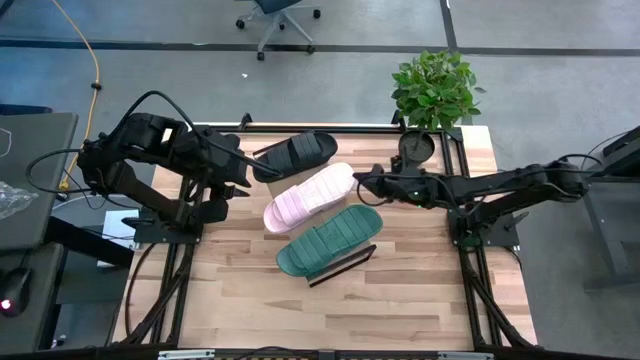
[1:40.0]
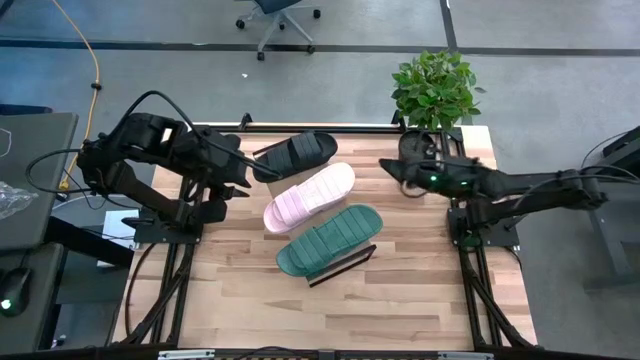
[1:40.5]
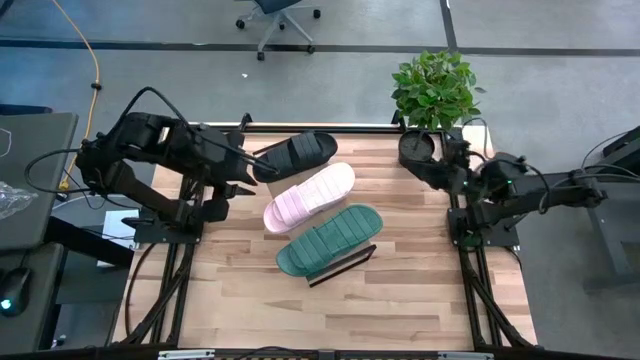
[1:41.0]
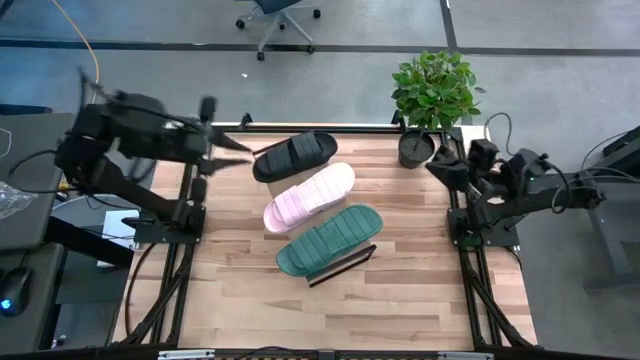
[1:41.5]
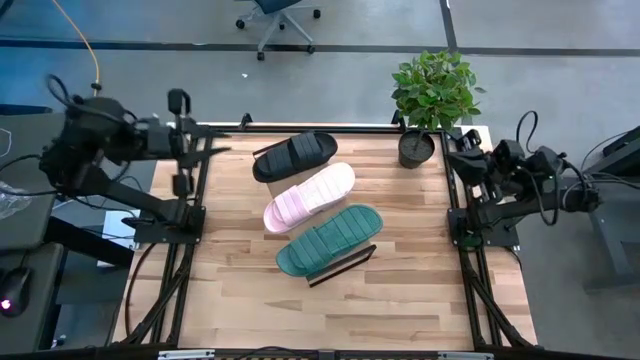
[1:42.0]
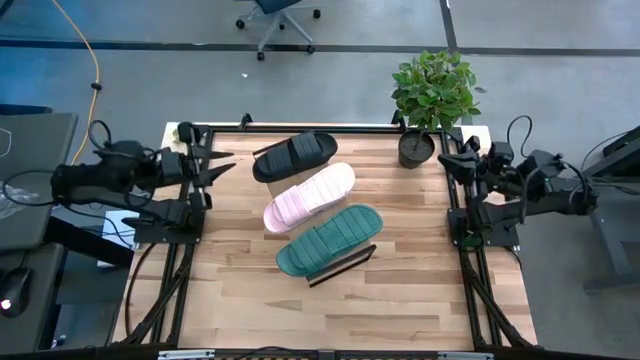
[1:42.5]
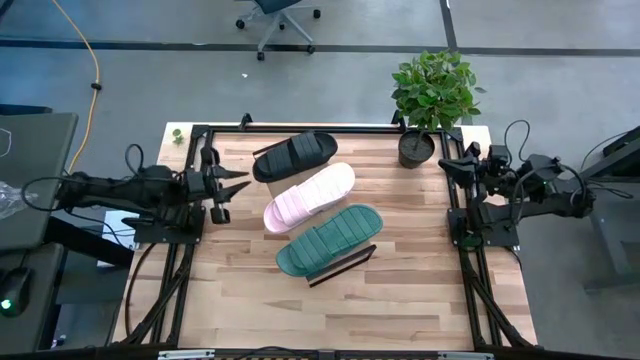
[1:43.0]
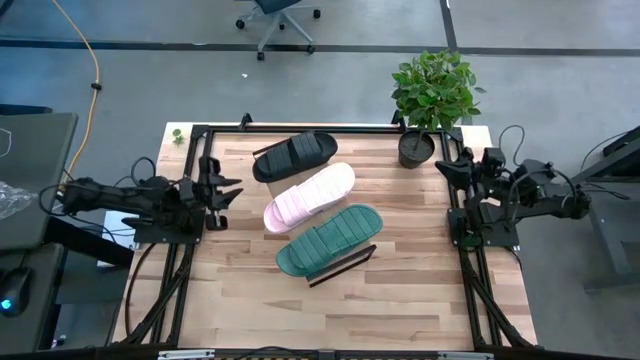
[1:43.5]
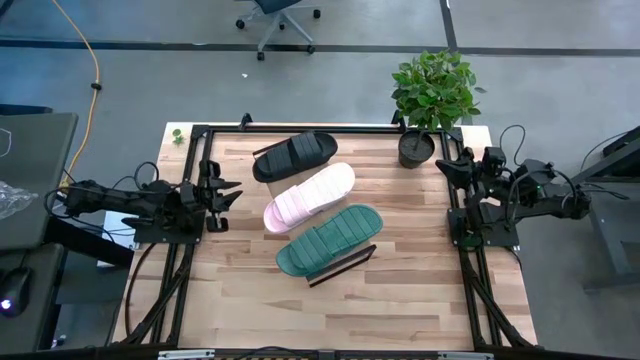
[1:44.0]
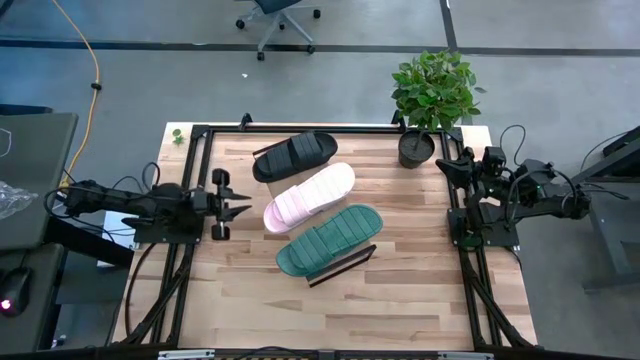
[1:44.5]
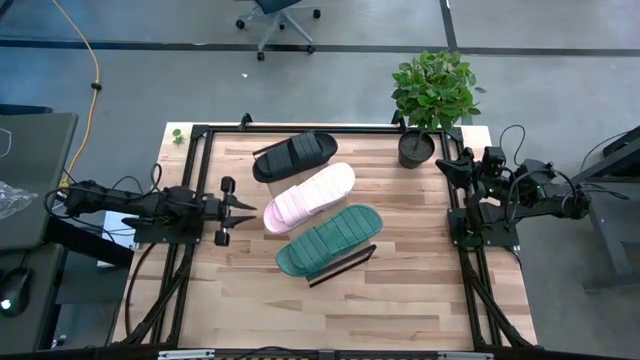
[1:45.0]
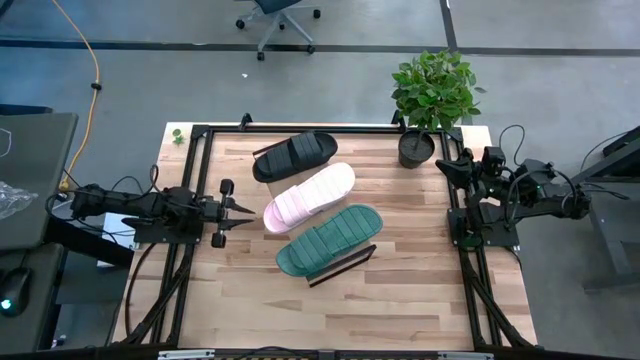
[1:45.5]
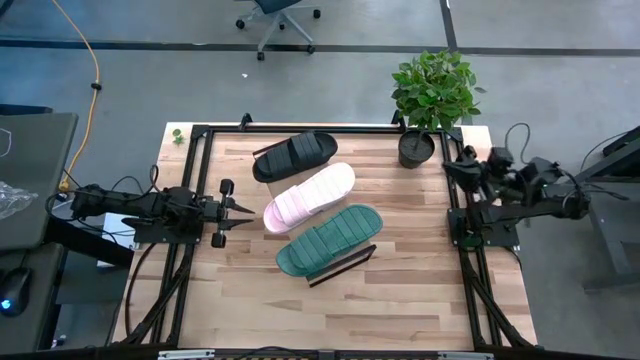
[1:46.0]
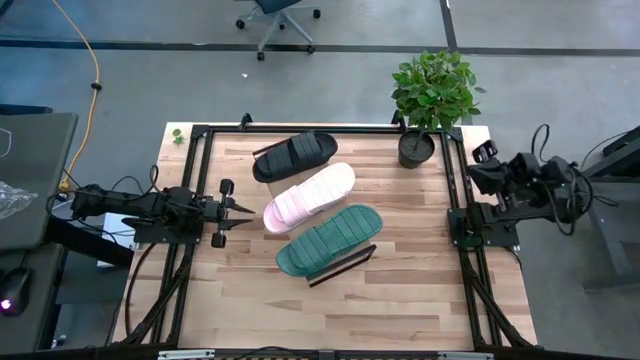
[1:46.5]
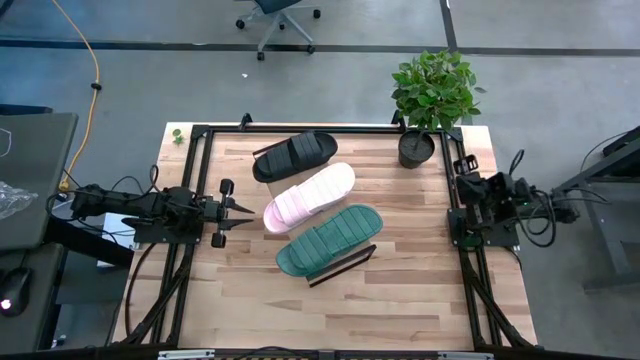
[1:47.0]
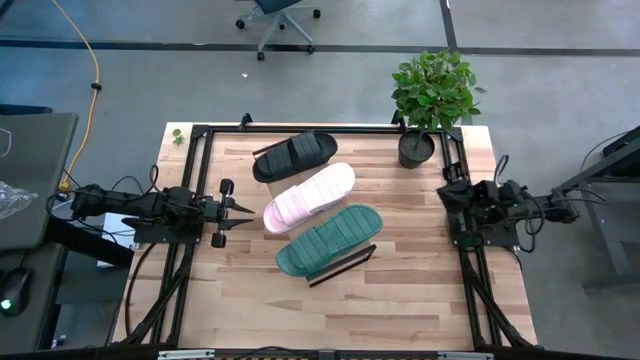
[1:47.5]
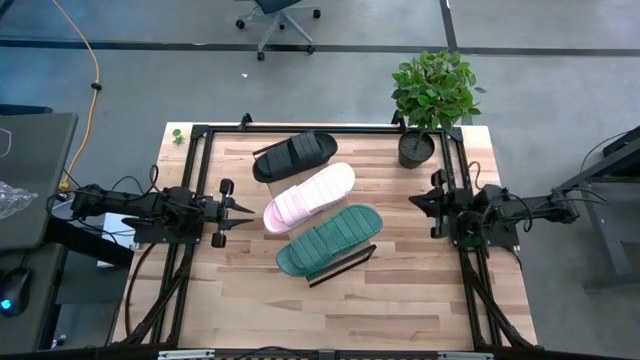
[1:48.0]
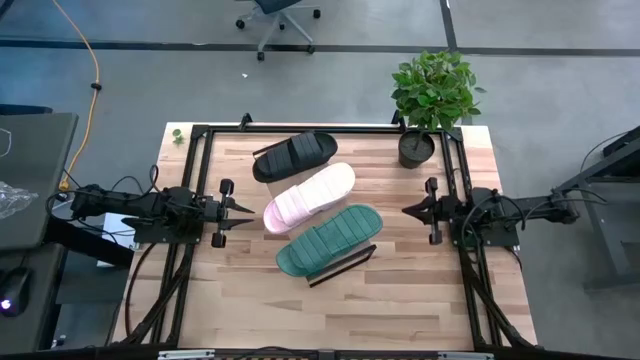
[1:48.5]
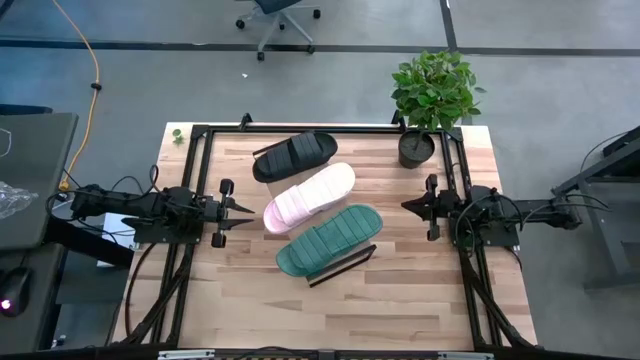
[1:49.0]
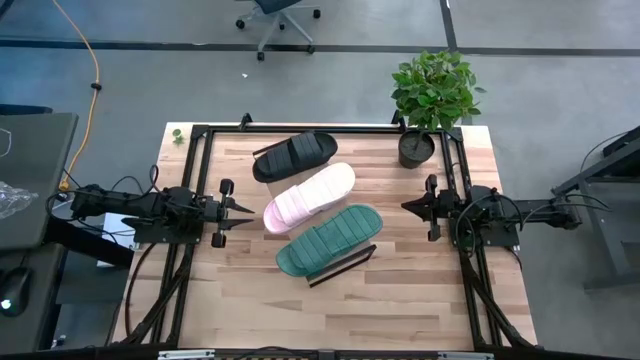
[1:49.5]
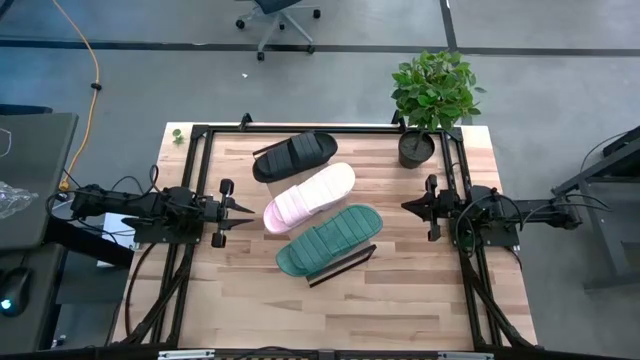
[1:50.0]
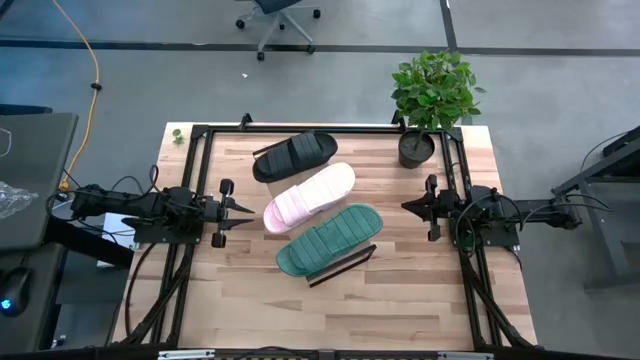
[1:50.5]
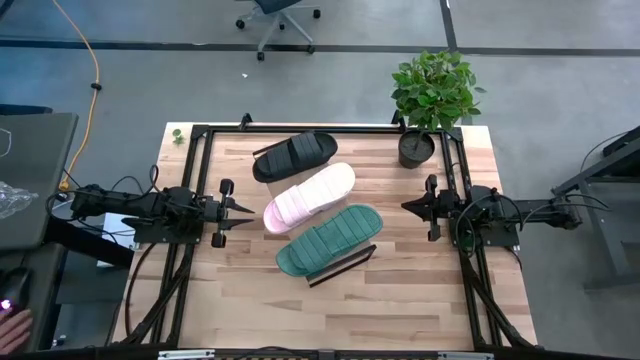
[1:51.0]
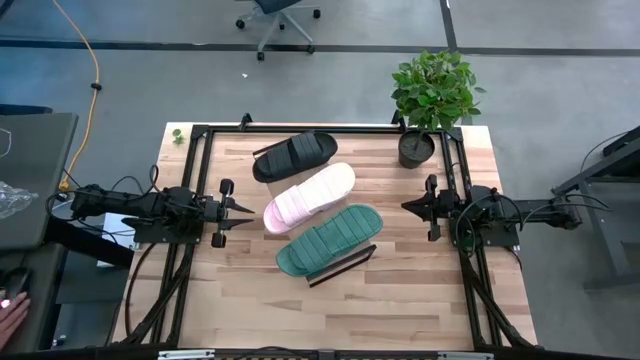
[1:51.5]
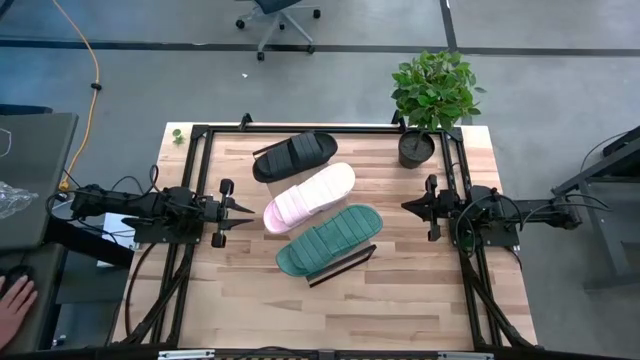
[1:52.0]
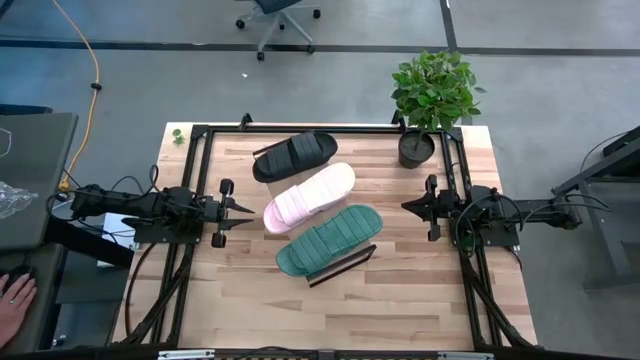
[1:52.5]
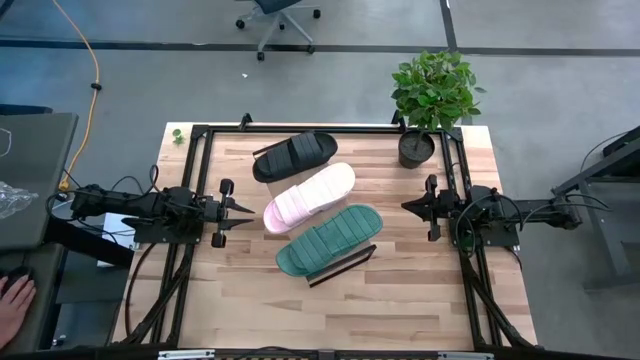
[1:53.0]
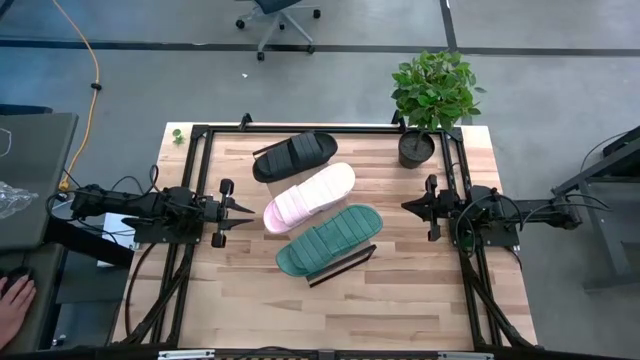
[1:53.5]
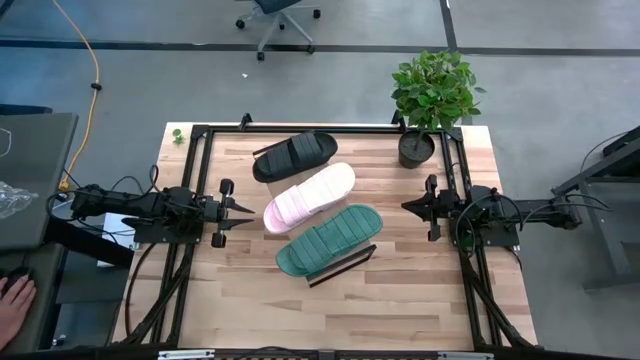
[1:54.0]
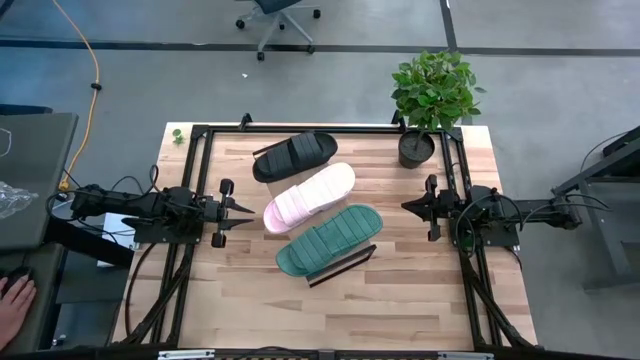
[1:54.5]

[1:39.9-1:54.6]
Task: Pick and place slides into the shelf
Return to Home Position

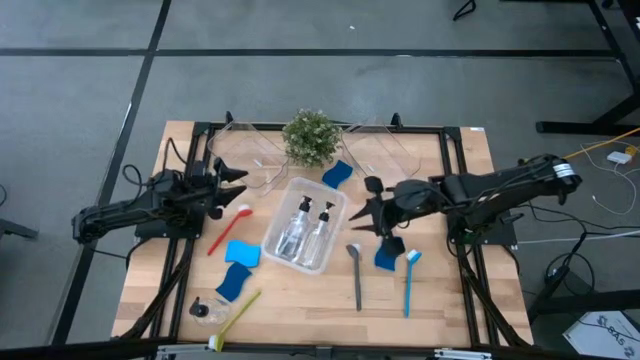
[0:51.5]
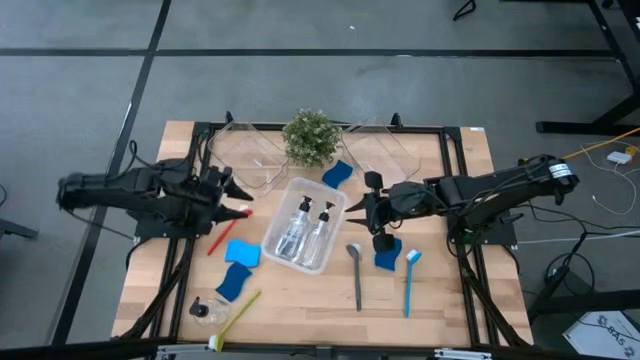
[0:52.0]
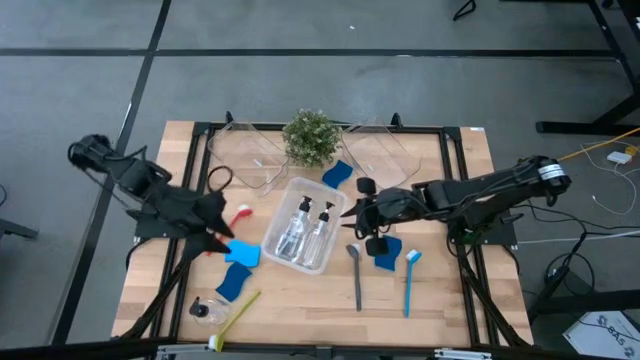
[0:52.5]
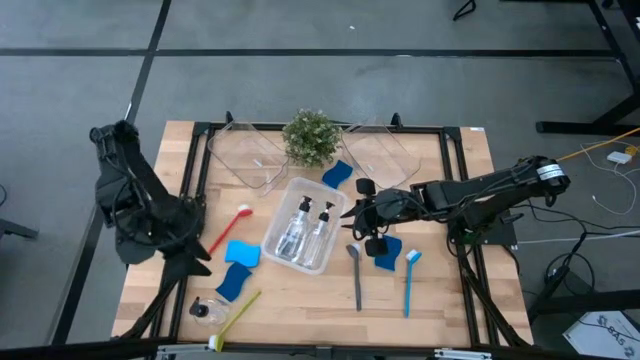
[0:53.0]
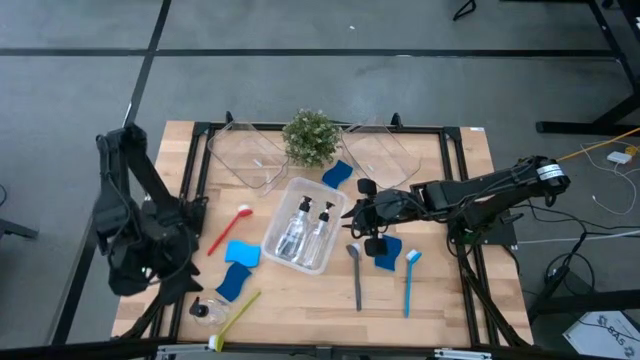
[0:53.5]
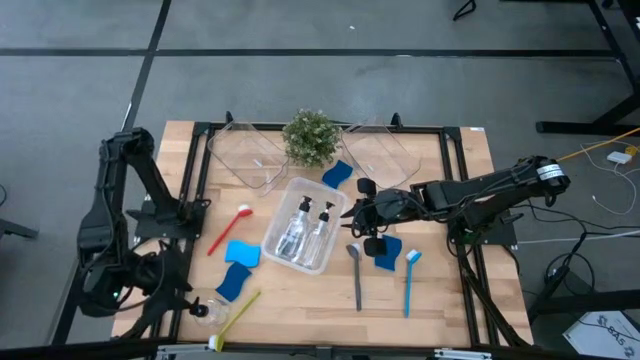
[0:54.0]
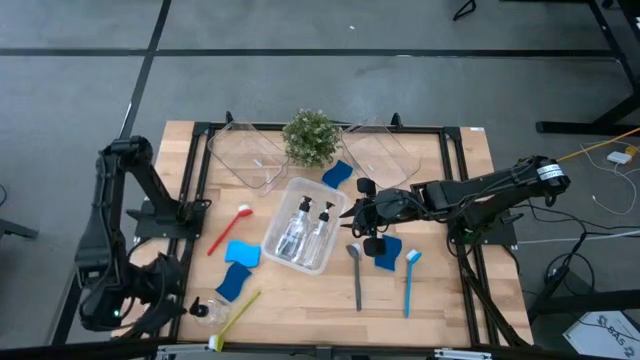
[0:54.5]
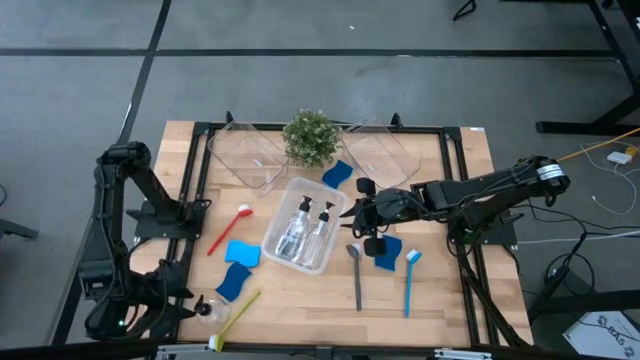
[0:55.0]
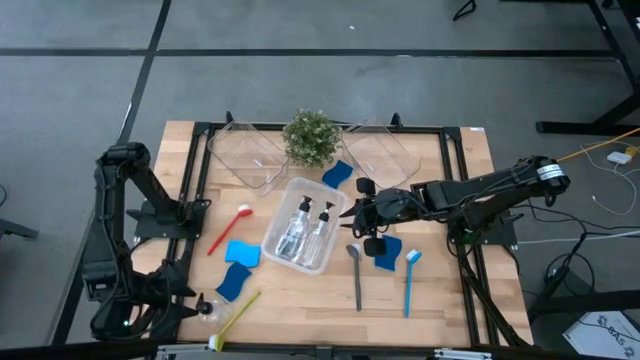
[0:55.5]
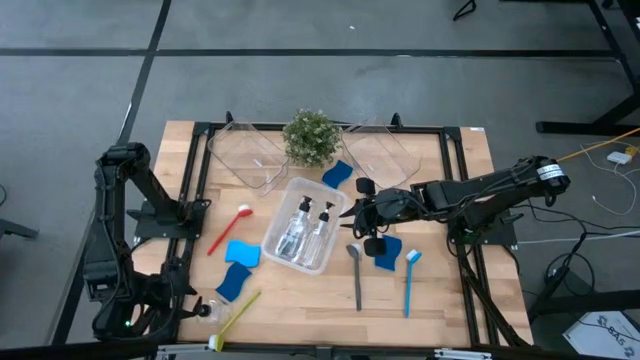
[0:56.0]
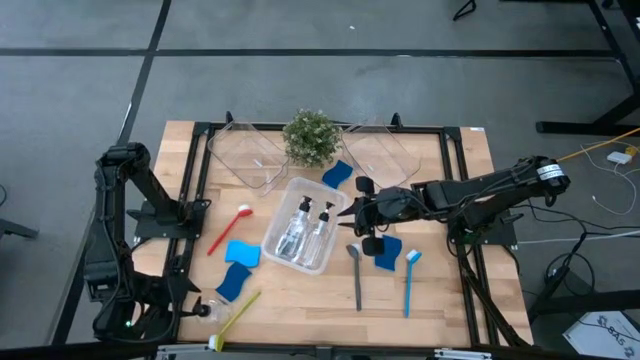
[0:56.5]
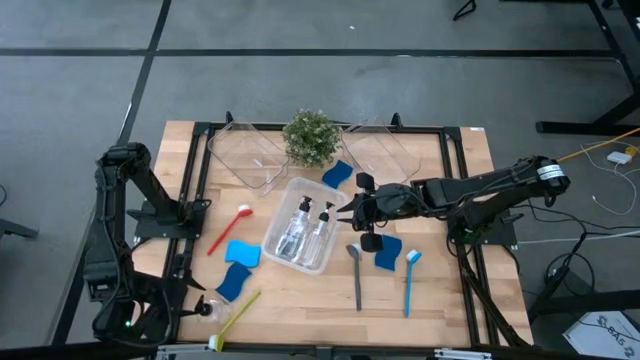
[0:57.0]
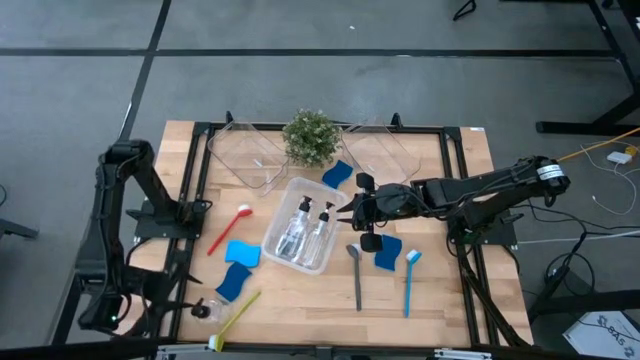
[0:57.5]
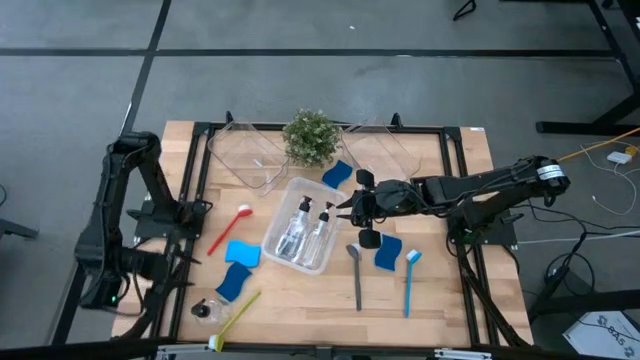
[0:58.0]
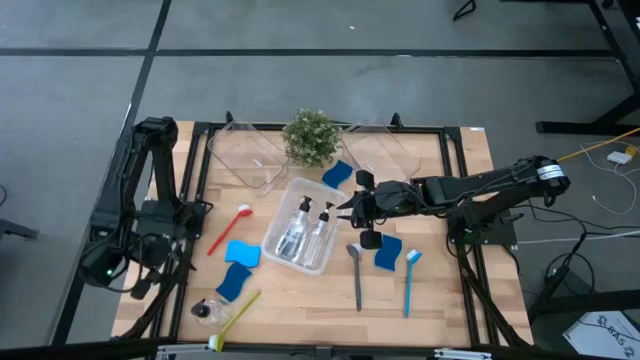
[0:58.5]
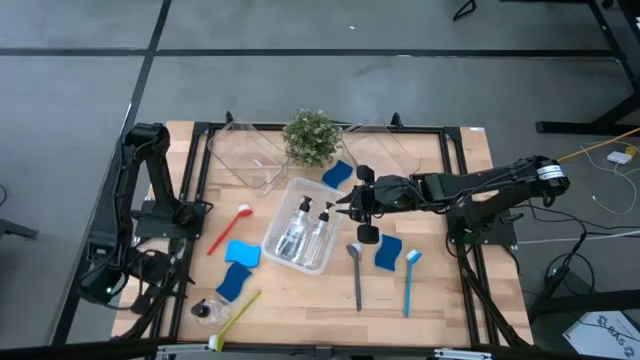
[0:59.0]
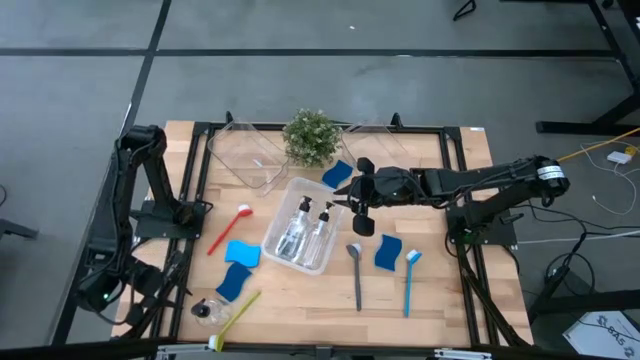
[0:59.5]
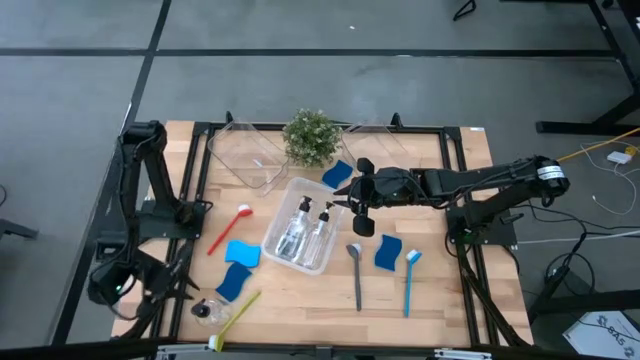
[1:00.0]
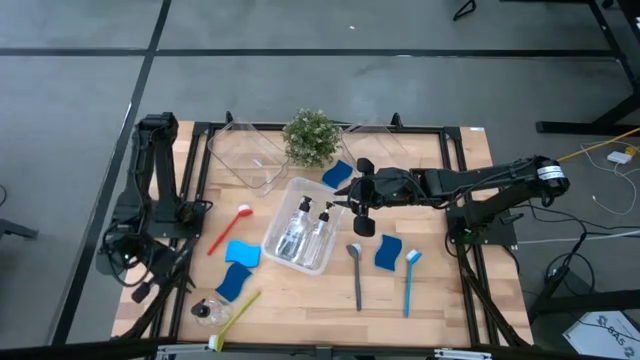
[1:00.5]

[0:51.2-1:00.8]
Task: Pick & Place Kitchen Sink Supplies
Put the liquid dispenser bottle into the white bin
